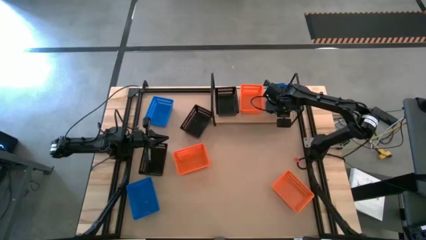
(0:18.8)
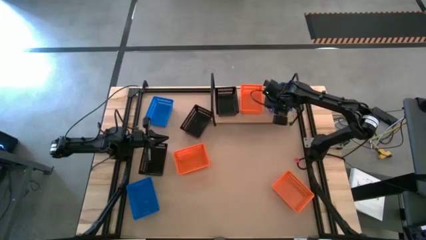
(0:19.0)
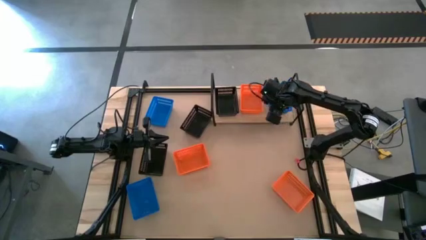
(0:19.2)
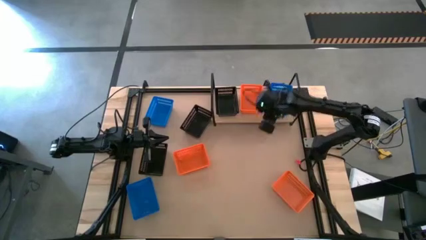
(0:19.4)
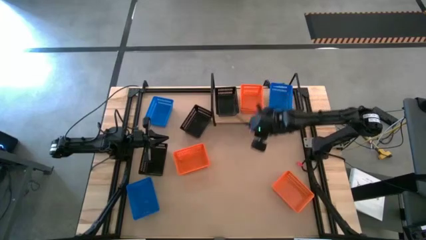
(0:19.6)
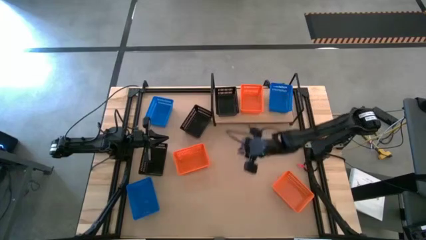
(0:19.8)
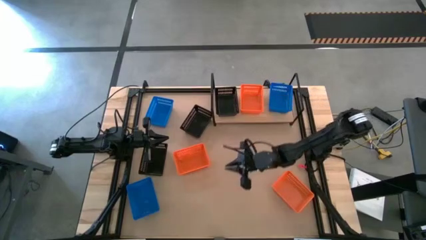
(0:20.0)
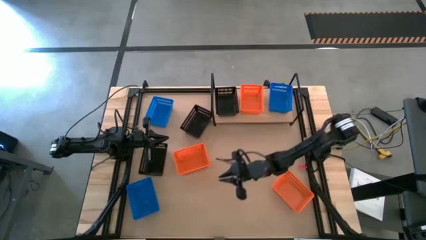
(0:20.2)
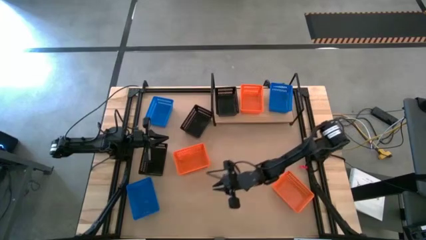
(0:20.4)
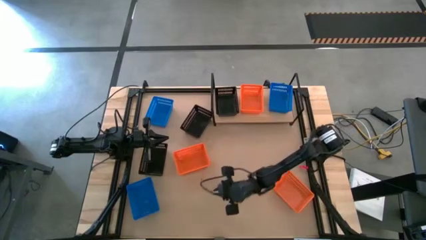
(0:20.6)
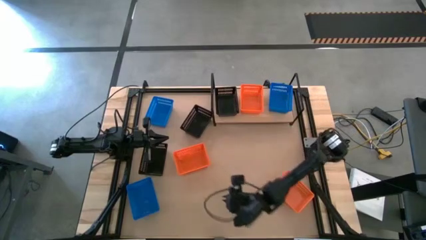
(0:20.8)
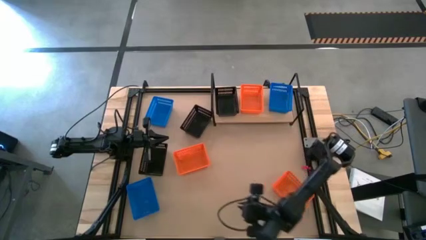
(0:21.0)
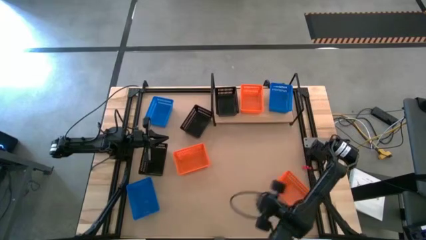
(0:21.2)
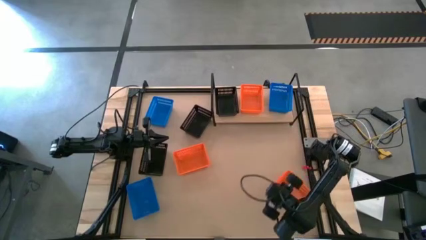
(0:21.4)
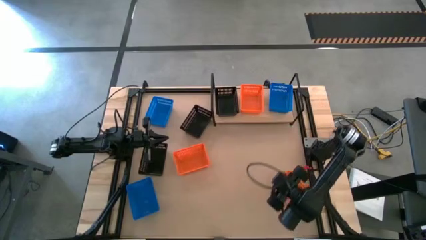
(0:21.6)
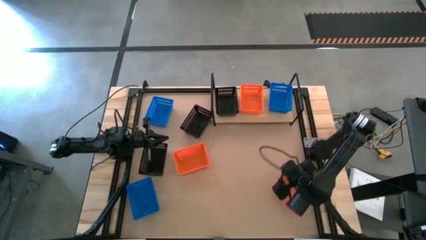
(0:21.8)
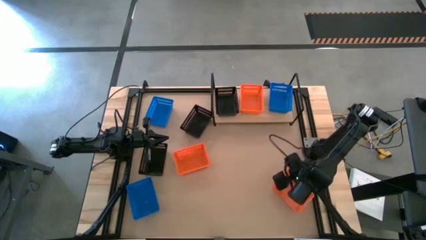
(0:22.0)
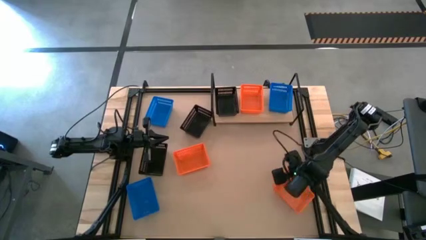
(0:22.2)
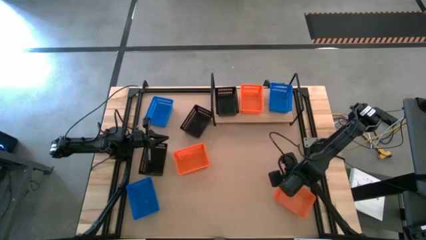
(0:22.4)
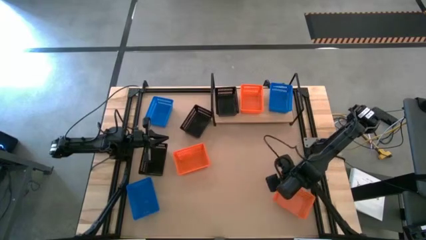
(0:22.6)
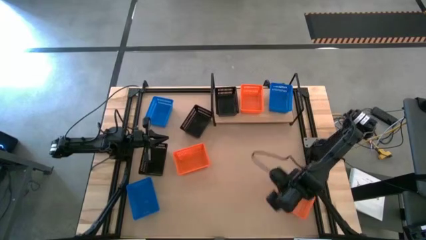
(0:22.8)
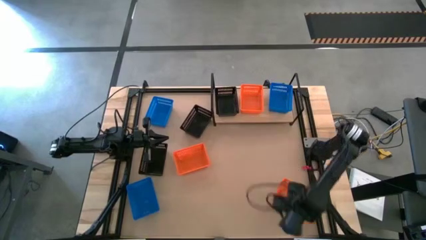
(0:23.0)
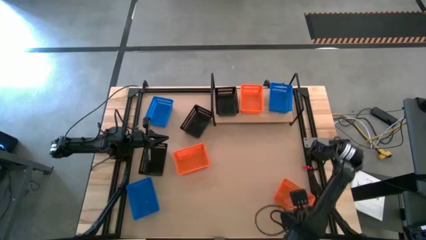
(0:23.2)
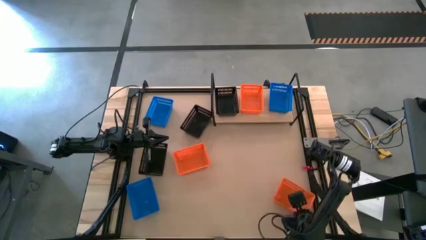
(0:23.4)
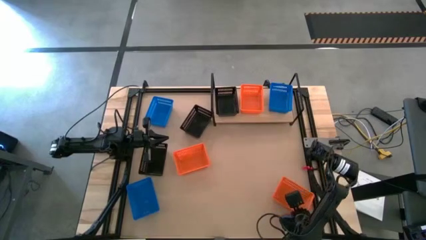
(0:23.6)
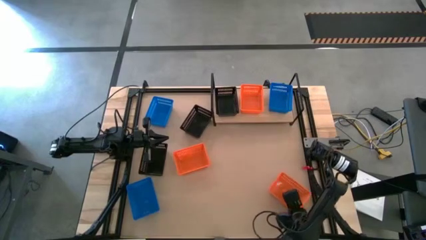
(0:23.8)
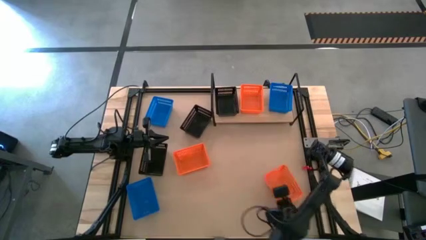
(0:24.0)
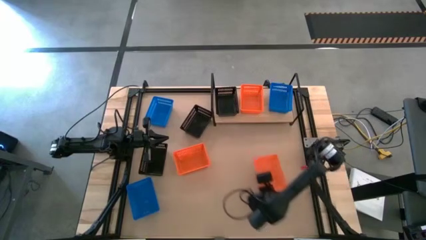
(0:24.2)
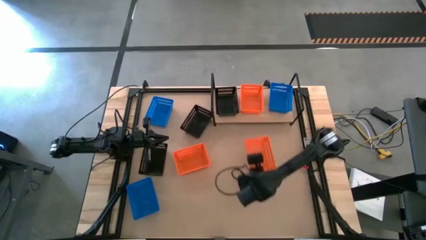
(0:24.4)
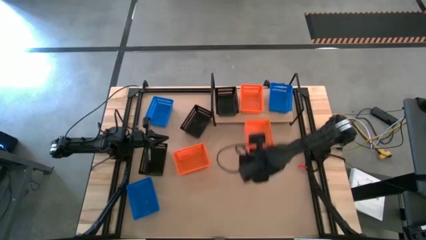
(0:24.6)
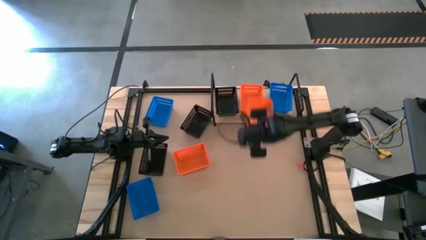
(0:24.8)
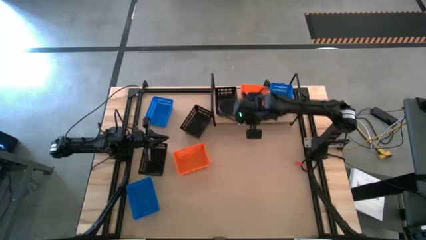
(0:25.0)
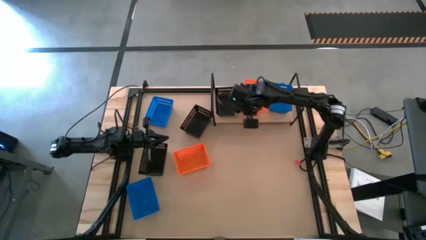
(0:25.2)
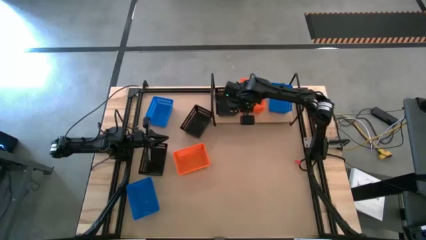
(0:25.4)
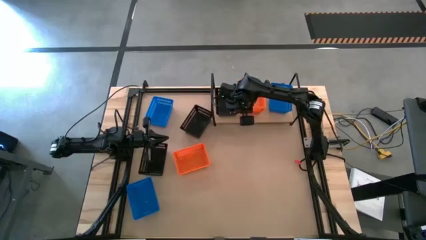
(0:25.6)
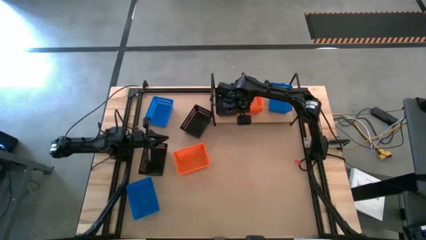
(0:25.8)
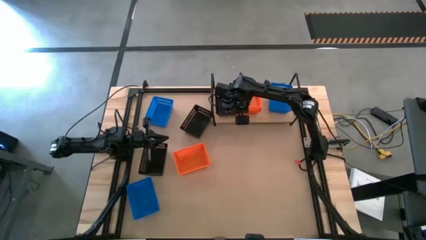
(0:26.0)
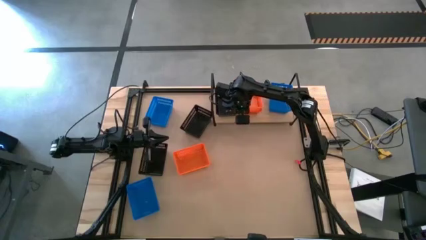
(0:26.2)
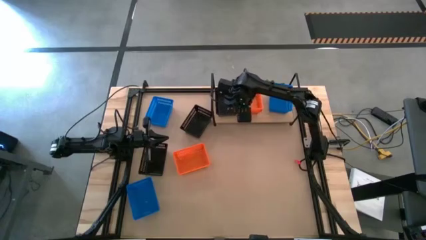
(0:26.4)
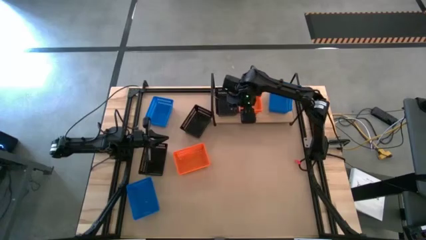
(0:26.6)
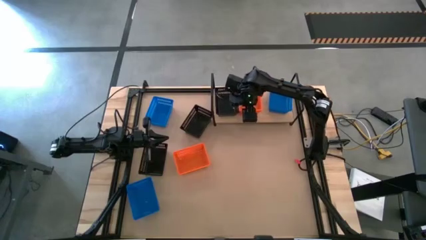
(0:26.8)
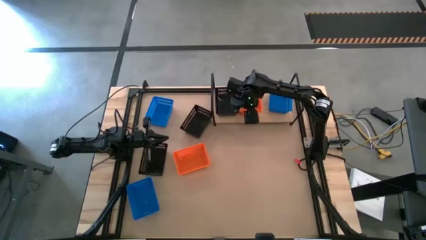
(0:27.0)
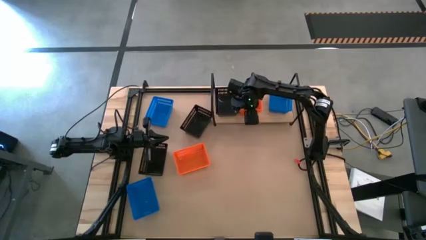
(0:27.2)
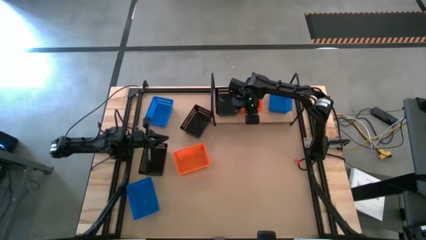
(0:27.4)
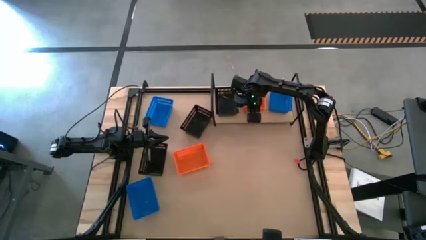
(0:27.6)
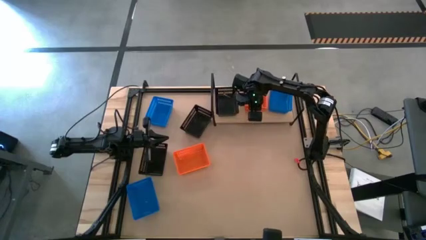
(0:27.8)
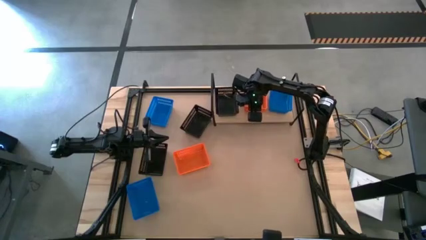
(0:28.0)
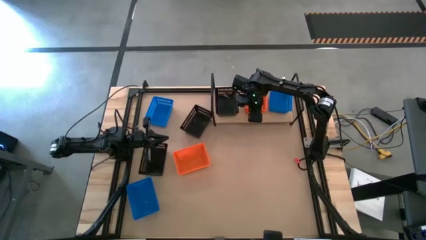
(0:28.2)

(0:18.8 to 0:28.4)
Task: Stack baskets on shelf by color
Stack the bottom orange bin on the orange bin on the shelf

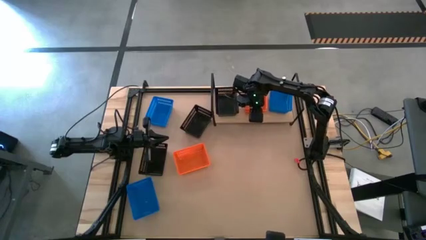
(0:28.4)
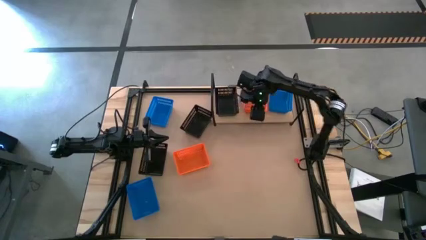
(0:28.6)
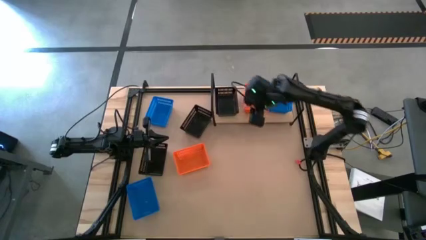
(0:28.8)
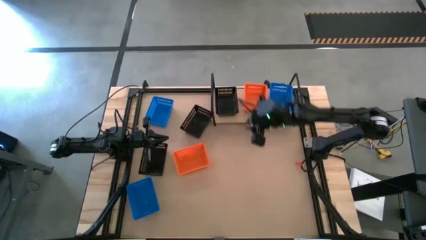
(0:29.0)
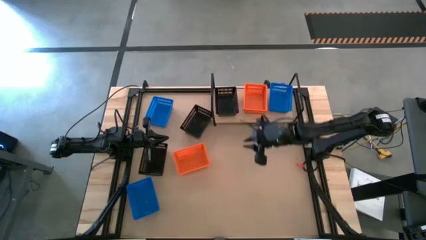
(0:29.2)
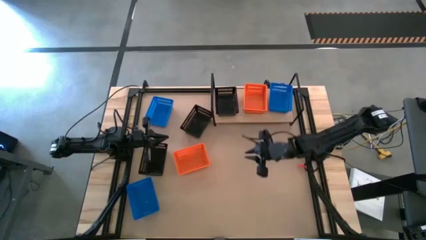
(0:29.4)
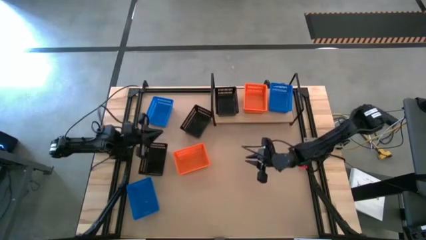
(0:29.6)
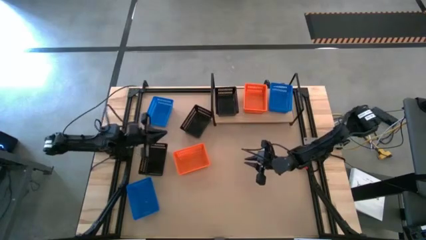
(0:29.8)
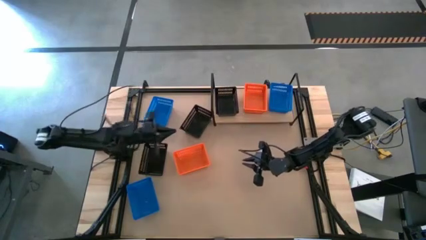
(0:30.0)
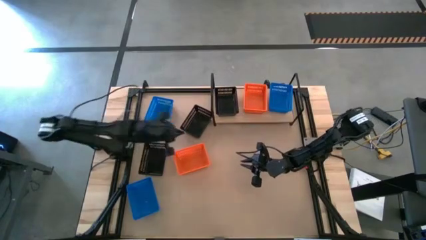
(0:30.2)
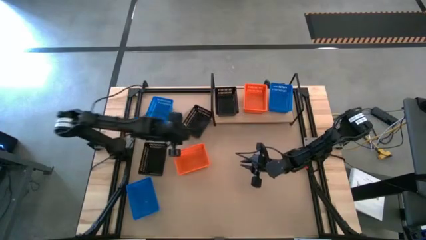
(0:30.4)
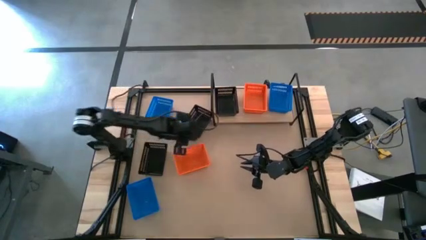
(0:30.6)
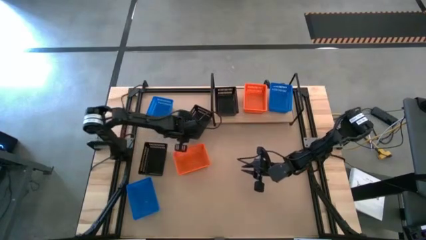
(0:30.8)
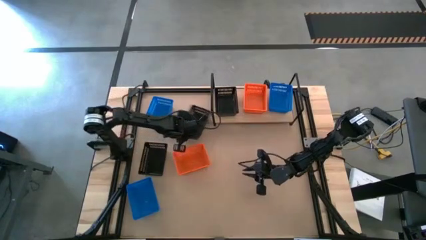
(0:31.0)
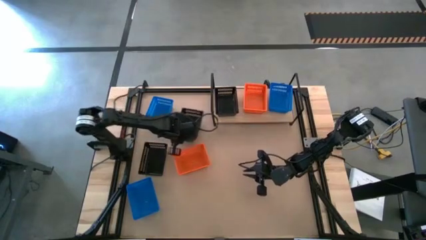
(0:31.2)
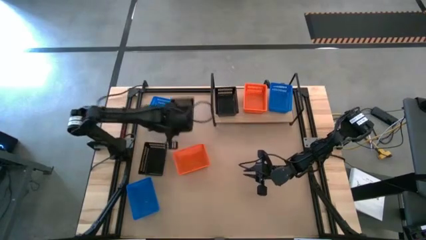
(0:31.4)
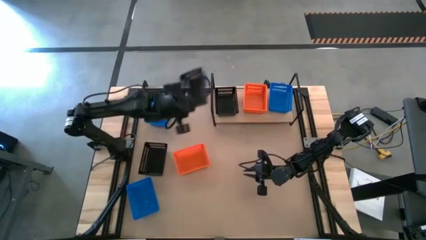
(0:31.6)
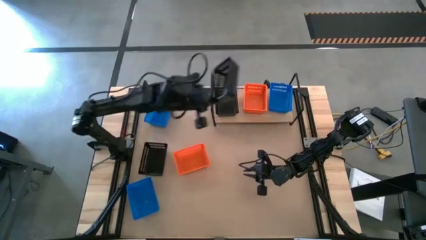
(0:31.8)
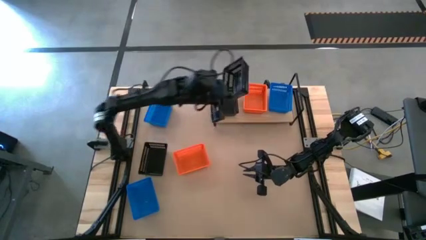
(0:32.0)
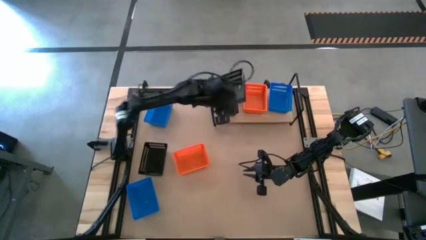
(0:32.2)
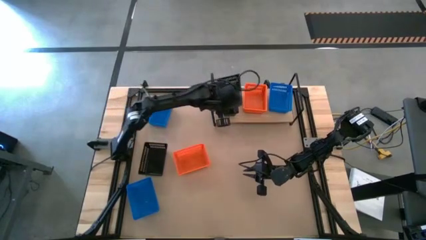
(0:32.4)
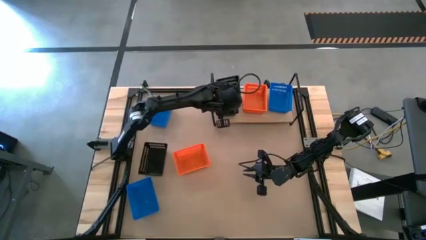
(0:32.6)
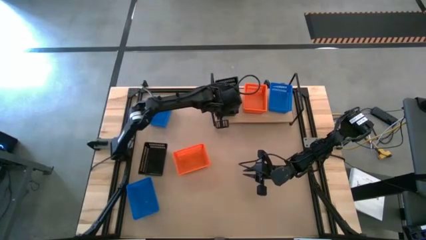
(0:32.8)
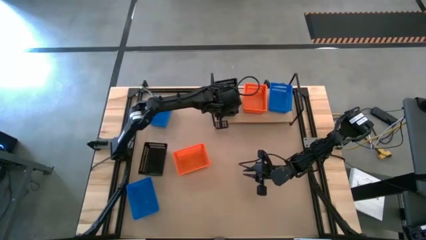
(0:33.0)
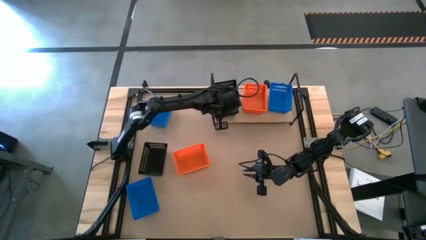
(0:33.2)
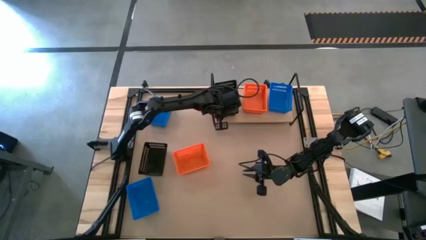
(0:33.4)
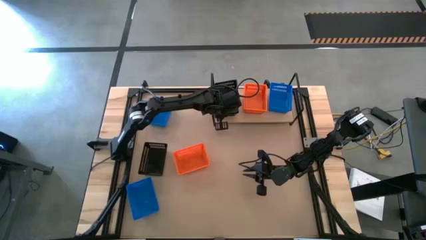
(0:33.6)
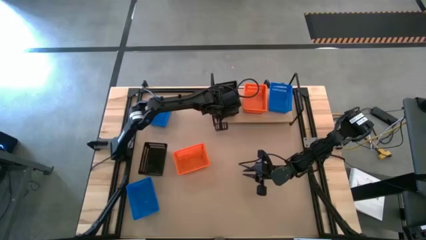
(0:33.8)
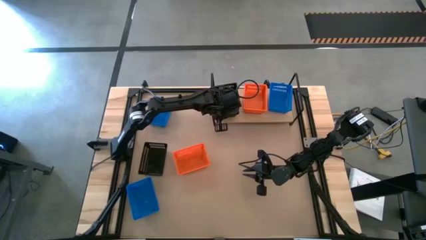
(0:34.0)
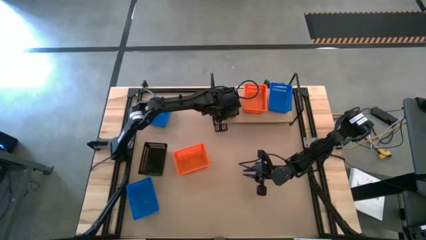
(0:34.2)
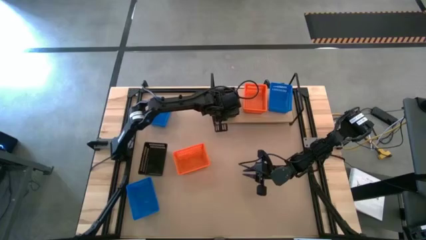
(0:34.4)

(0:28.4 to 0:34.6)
Stack the top black bin on the black bin on the shelf
